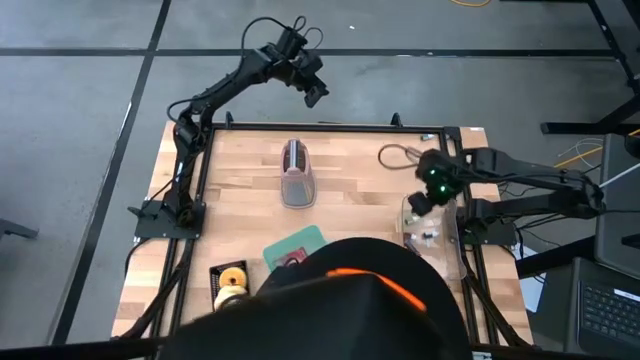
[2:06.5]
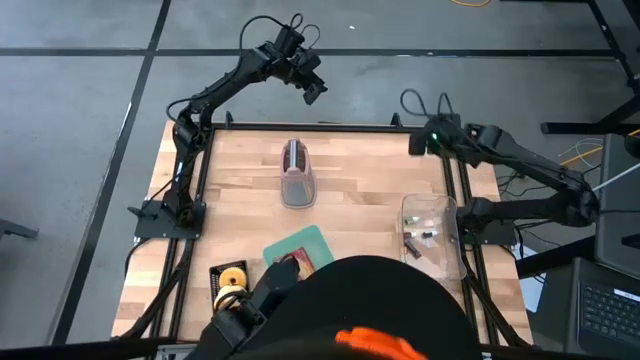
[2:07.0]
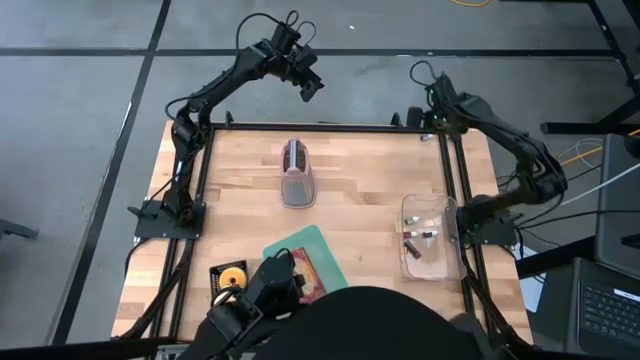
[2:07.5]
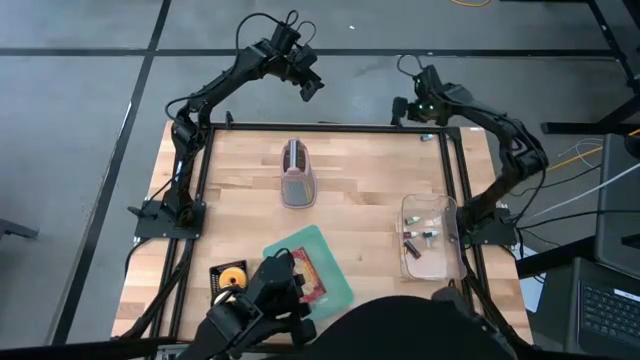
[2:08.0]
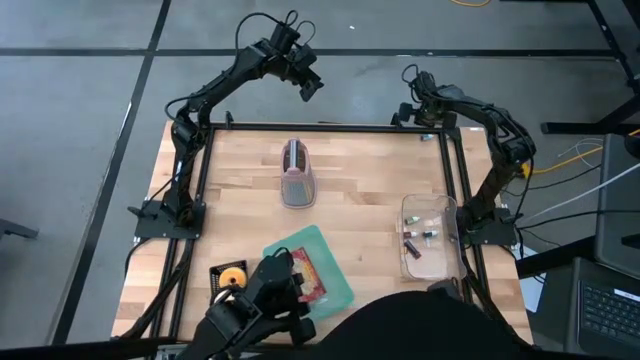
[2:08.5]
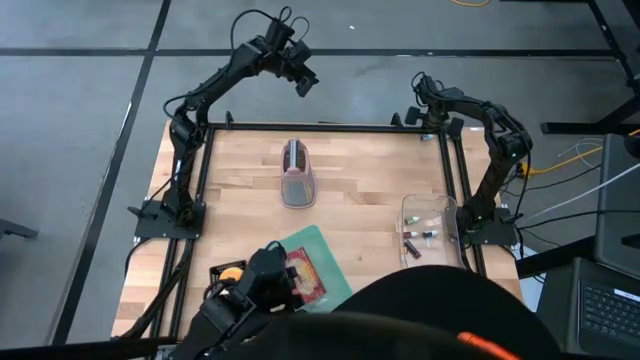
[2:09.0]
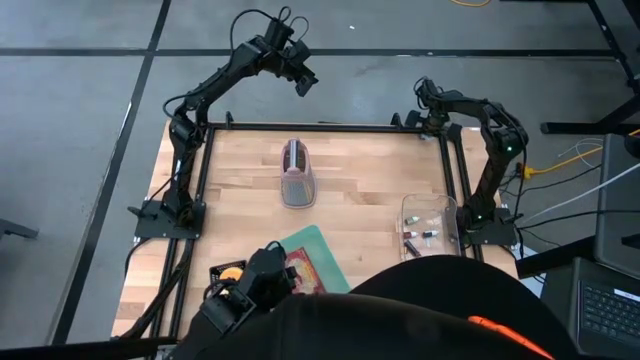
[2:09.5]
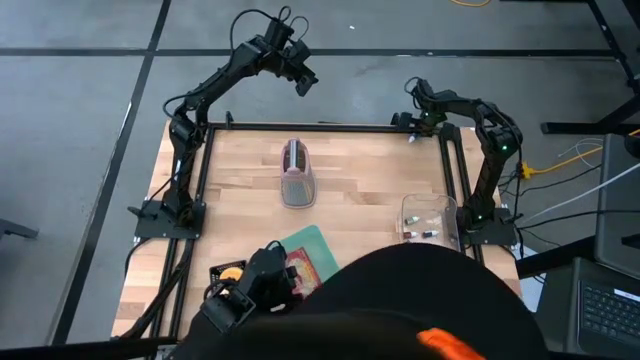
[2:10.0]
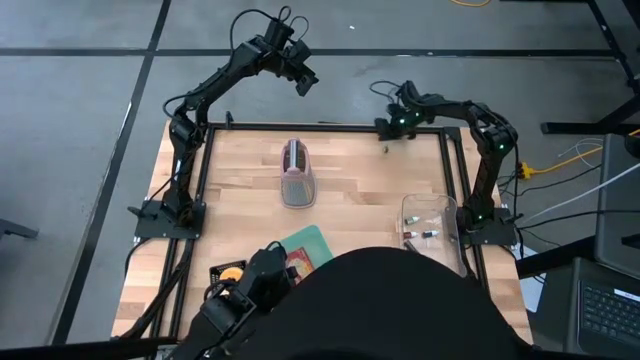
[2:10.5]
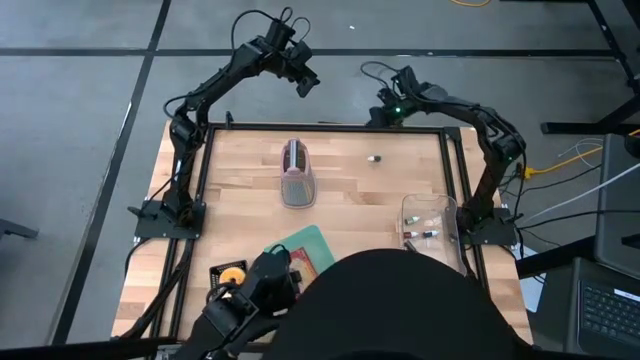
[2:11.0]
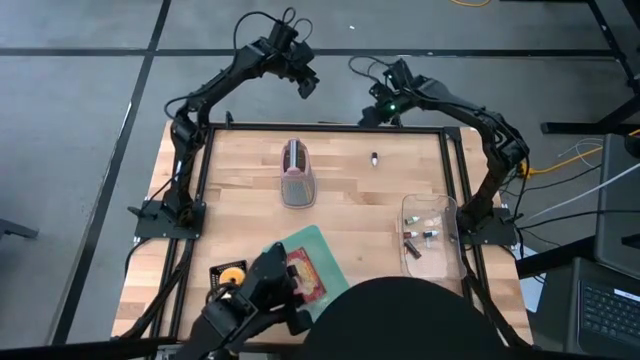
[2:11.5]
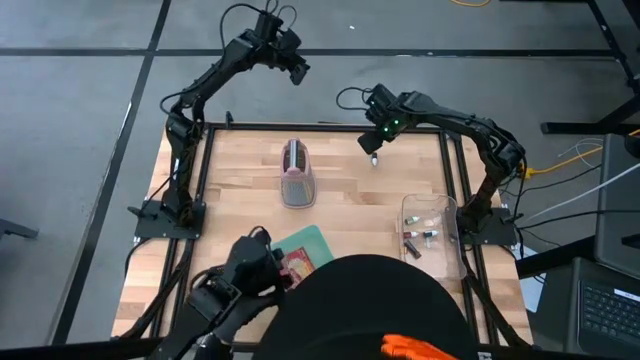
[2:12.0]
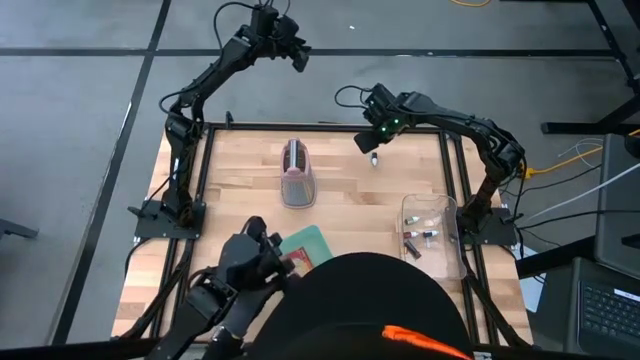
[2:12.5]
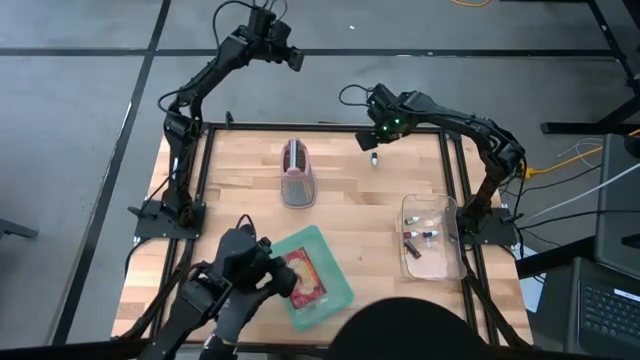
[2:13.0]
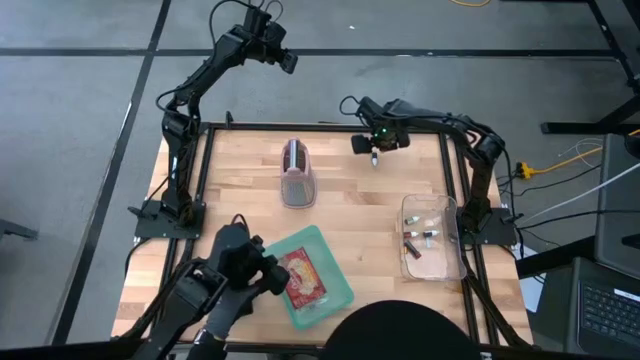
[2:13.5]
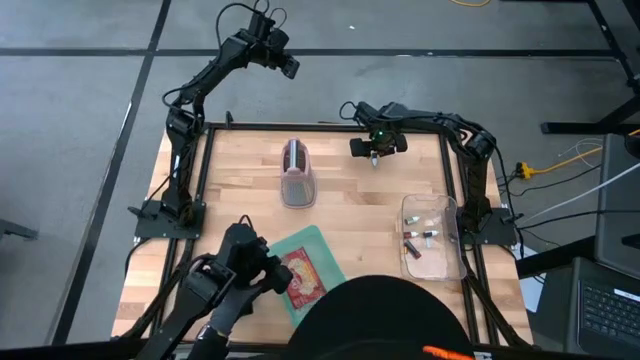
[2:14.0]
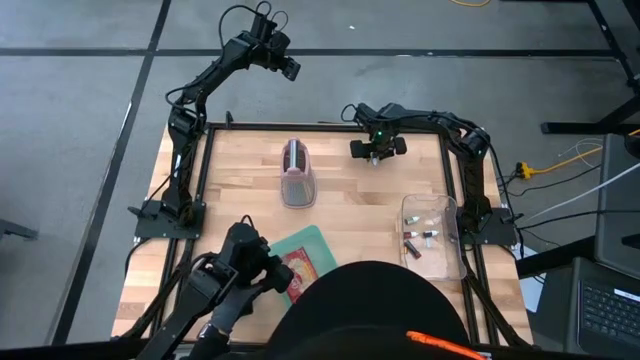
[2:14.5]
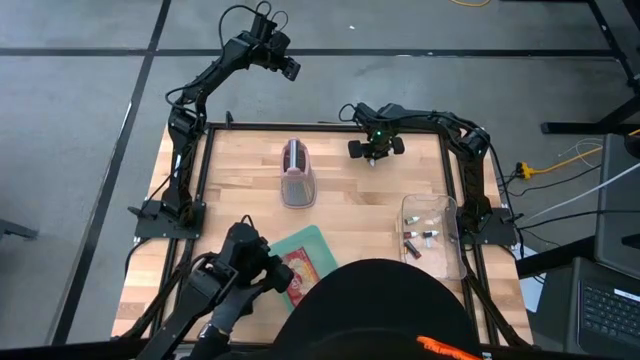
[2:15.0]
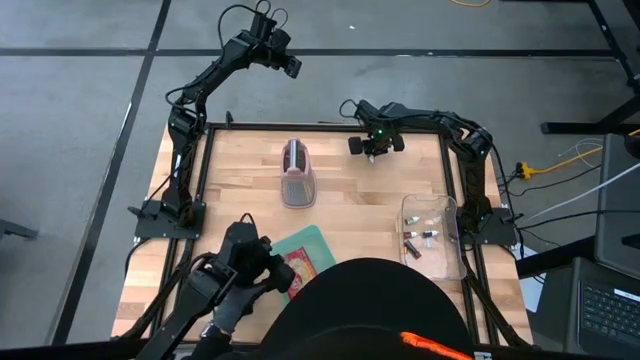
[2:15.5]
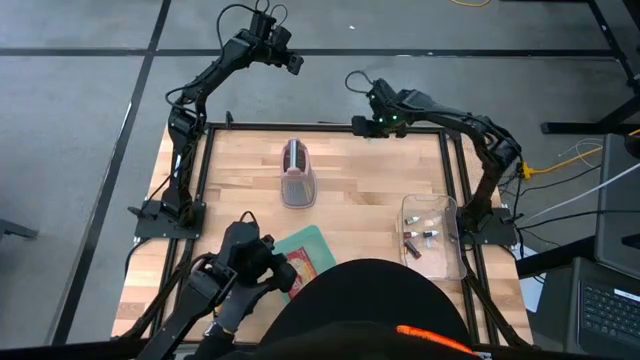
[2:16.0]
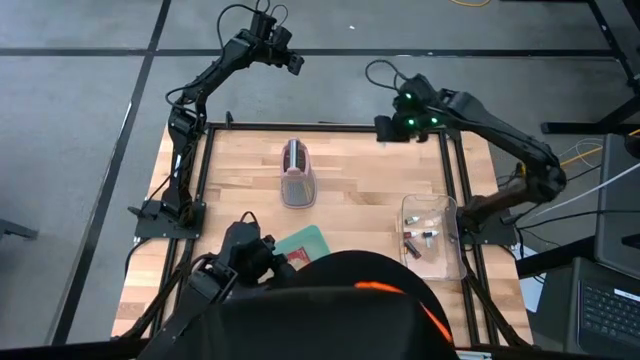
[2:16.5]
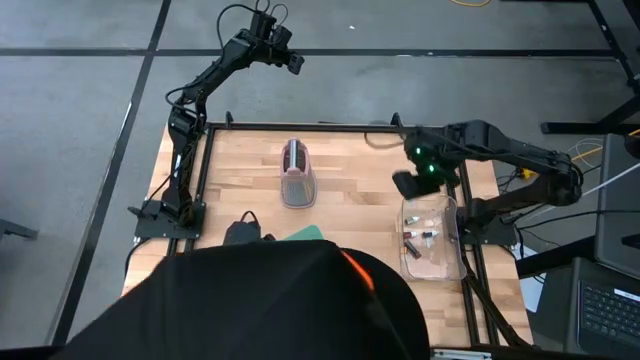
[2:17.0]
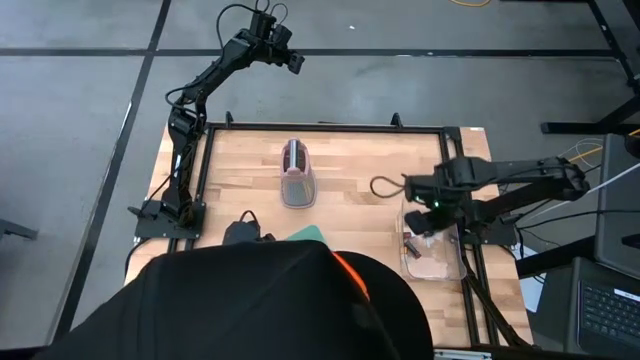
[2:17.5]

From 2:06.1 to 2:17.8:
Task: Pick & Place Food Item
Put the blue food coloring bottle into the transparent bin

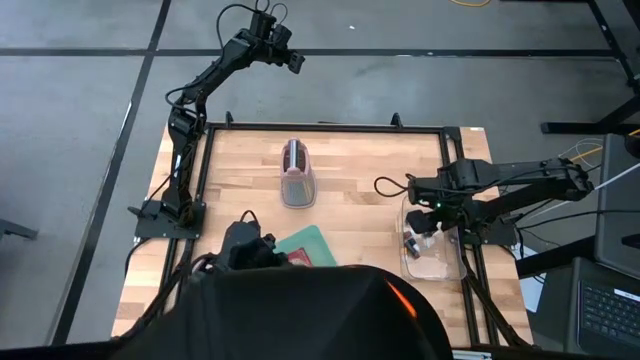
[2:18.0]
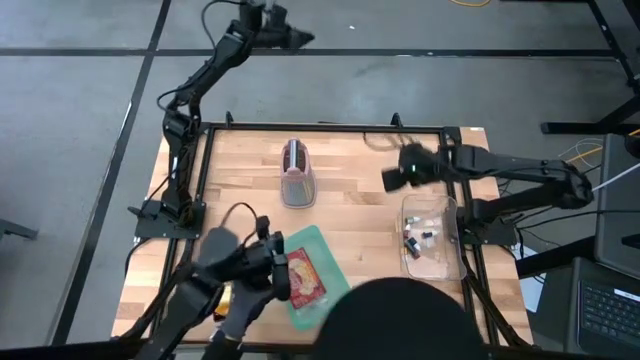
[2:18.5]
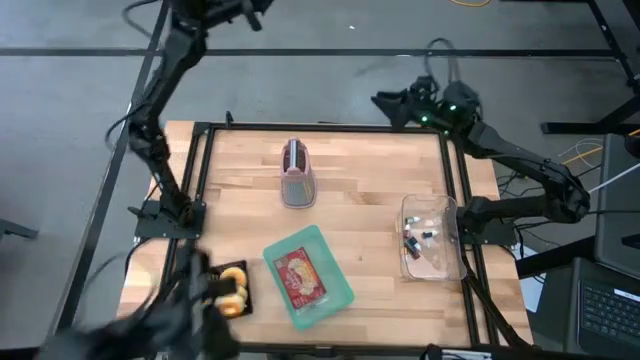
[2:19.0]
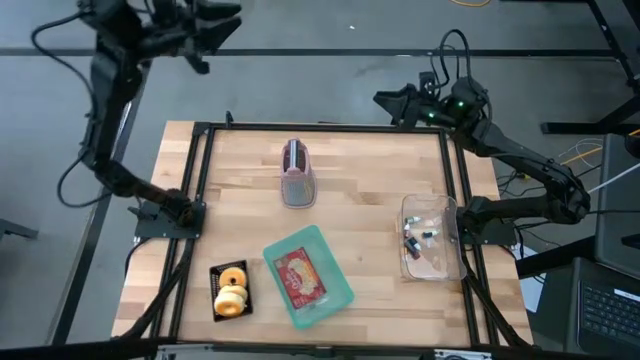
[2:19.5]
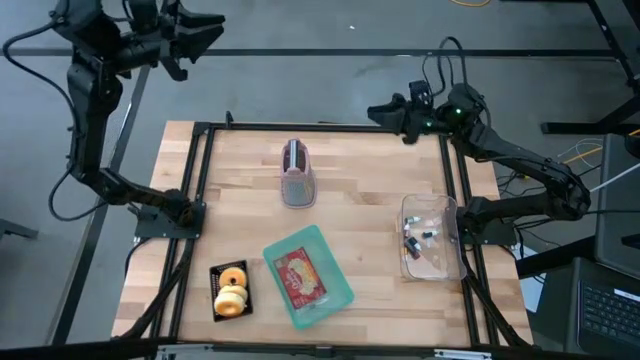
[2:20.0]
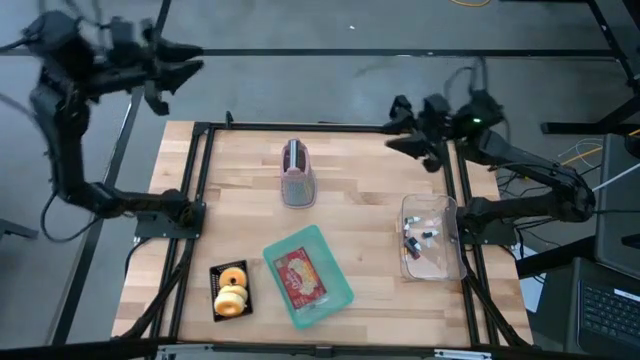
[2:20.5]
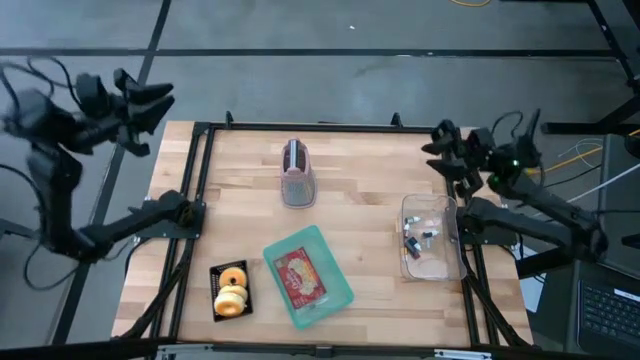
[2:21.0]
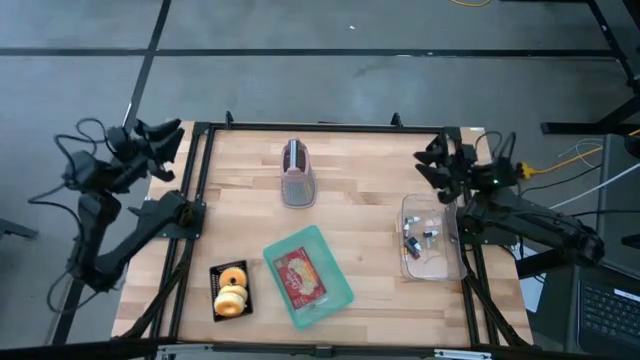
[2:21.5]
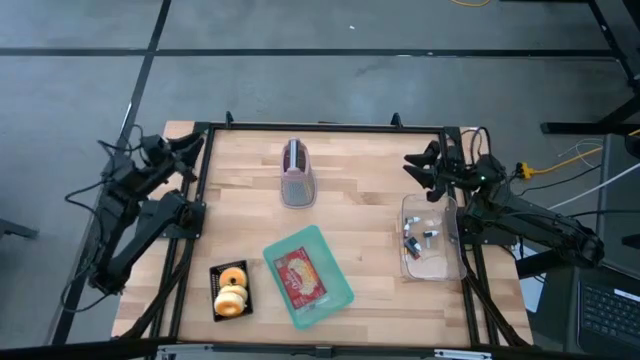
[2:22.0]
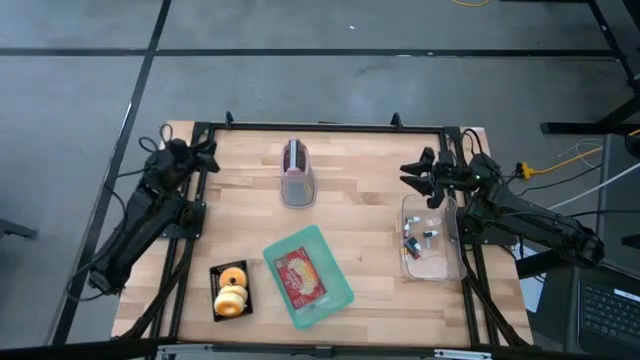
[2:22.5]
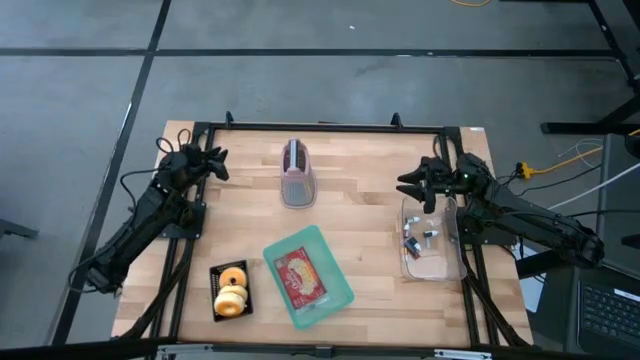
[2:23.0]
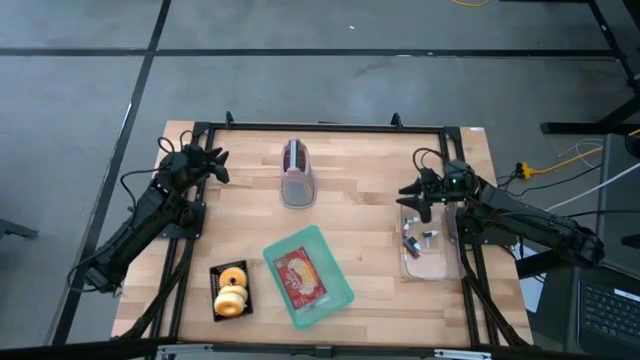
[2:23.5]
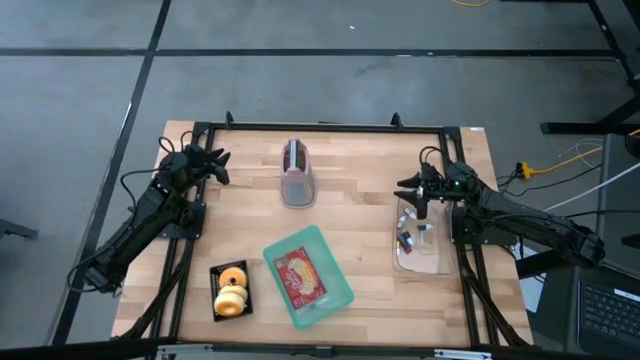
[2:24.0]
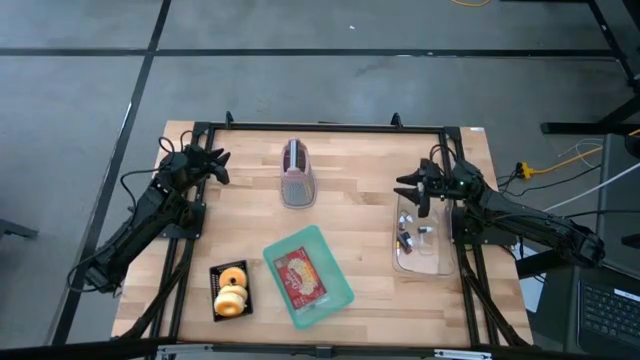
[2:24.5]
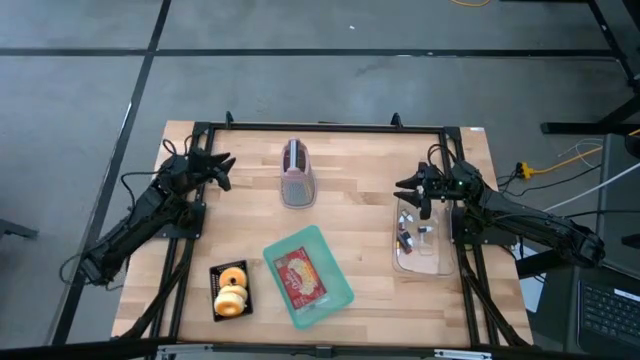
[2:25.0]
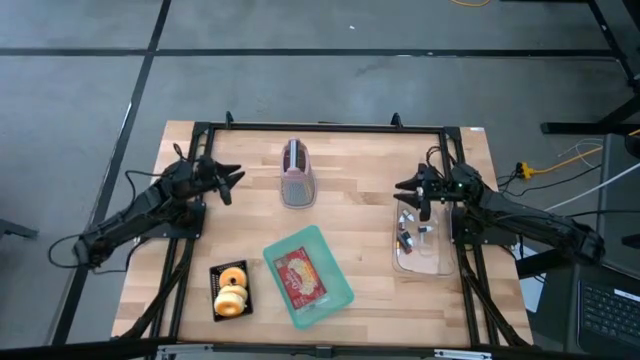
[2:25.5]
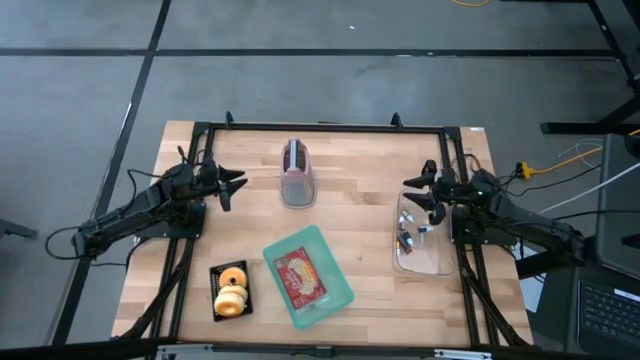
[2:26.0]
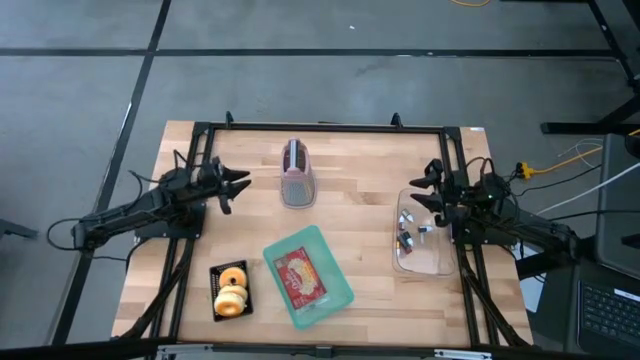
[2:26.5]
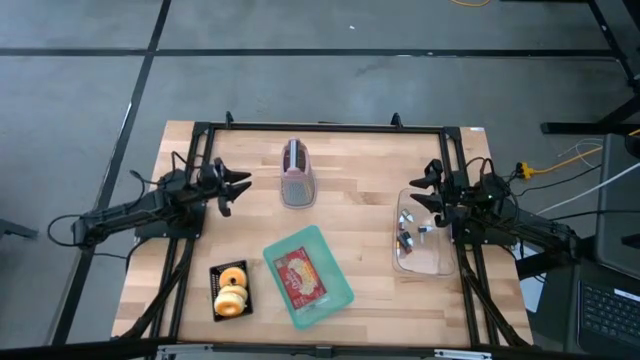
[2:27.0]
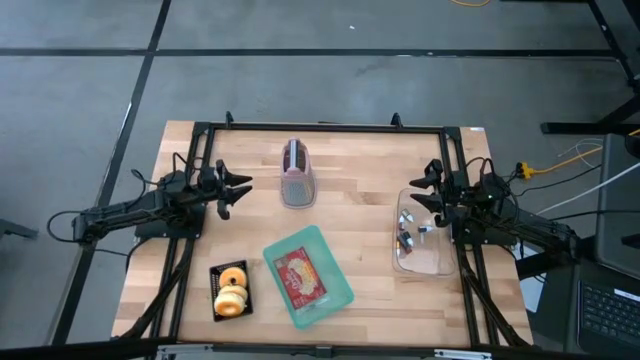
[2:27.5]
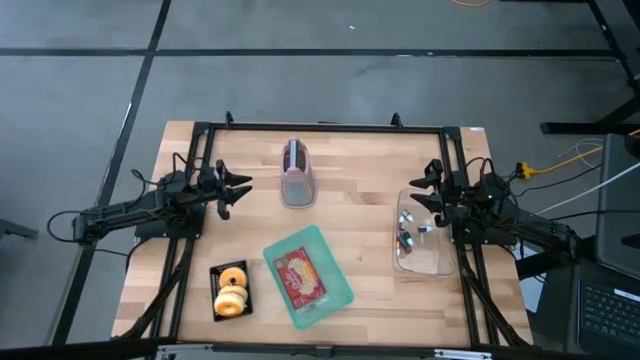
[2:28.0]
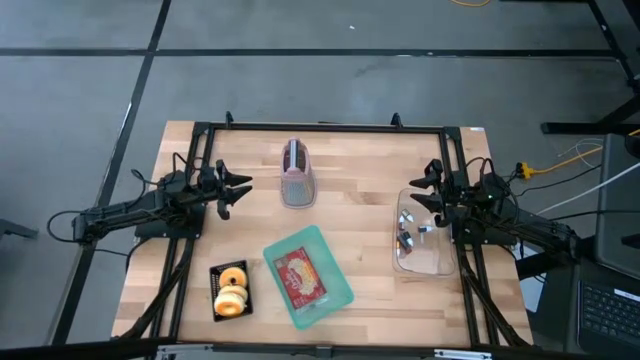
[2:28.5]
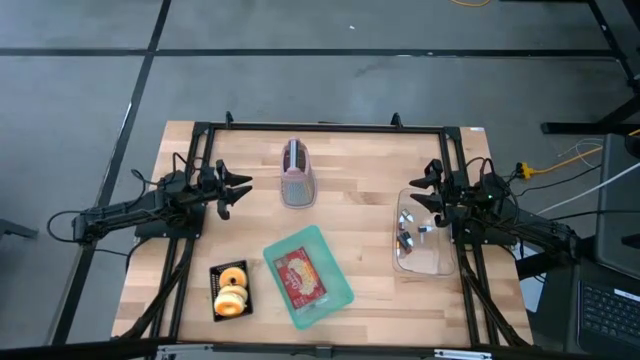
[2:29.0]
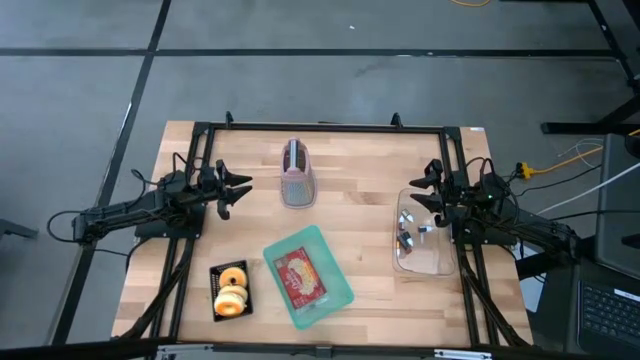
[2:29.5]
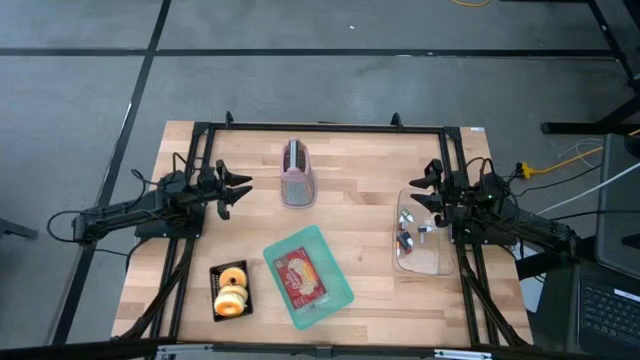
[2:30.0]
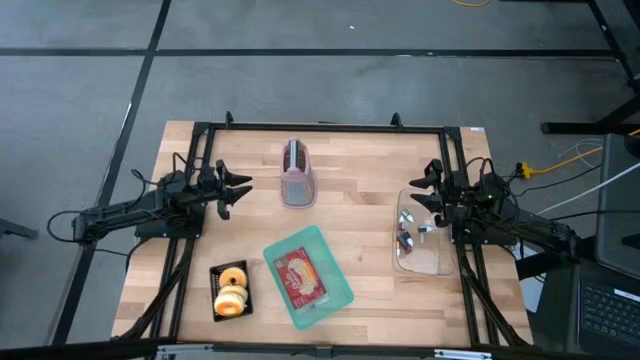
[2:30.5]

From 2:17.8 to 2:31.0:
Return to Home Position
